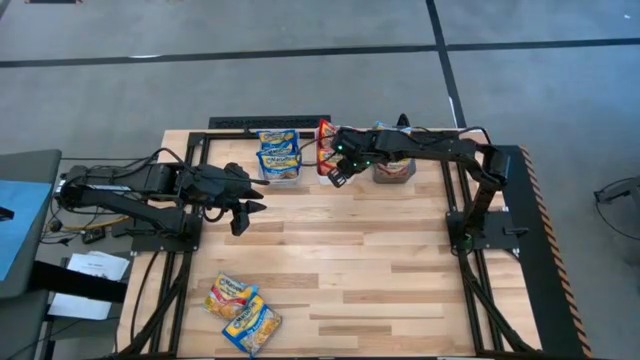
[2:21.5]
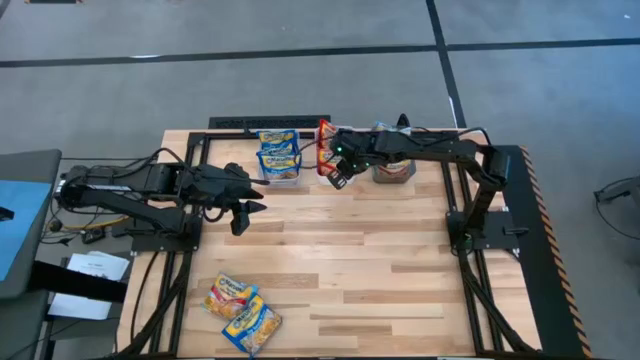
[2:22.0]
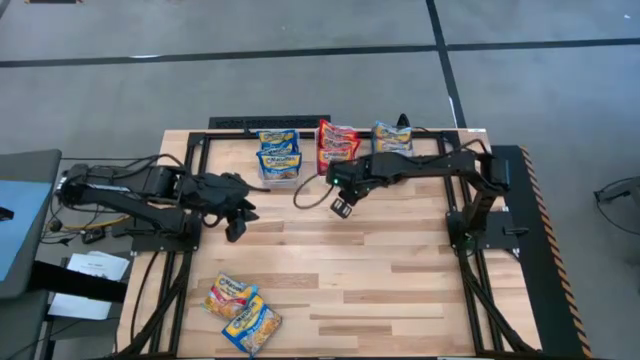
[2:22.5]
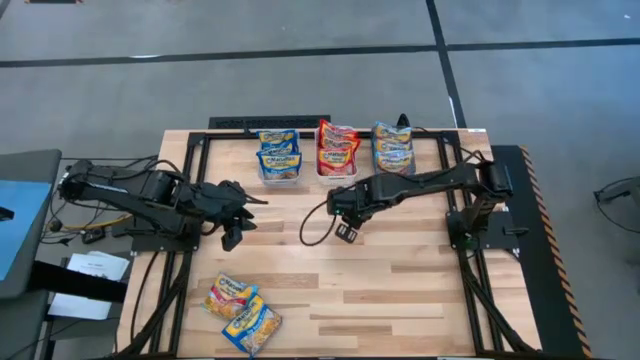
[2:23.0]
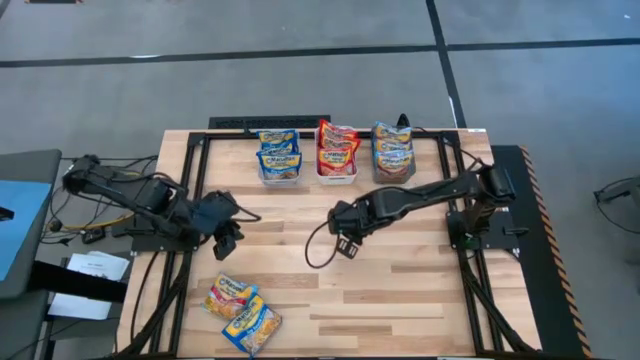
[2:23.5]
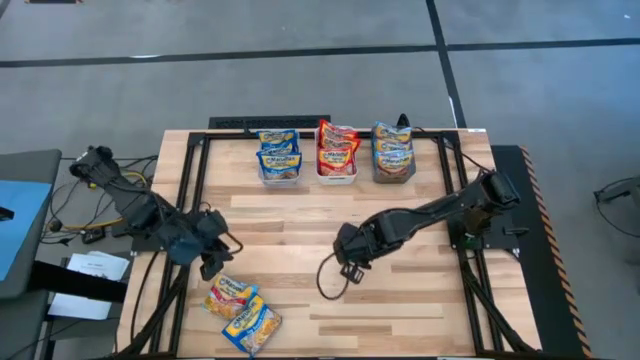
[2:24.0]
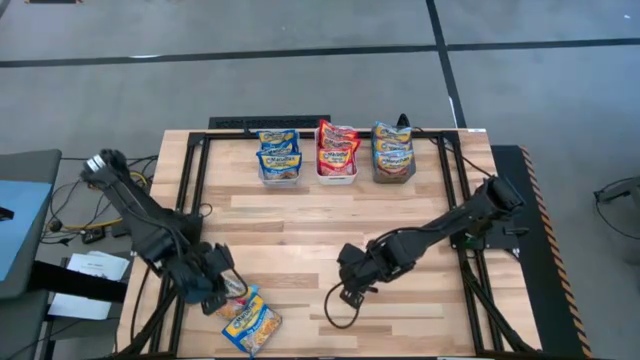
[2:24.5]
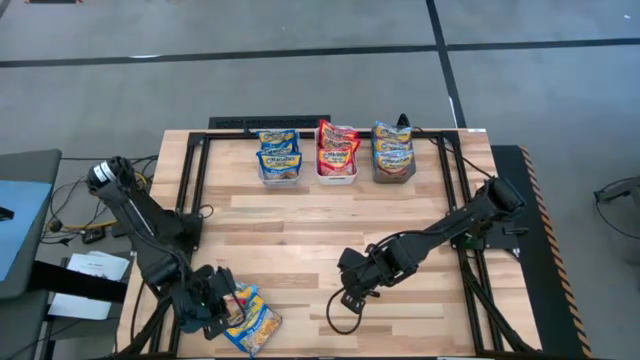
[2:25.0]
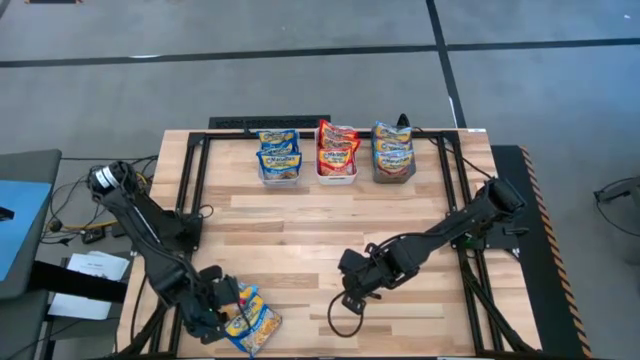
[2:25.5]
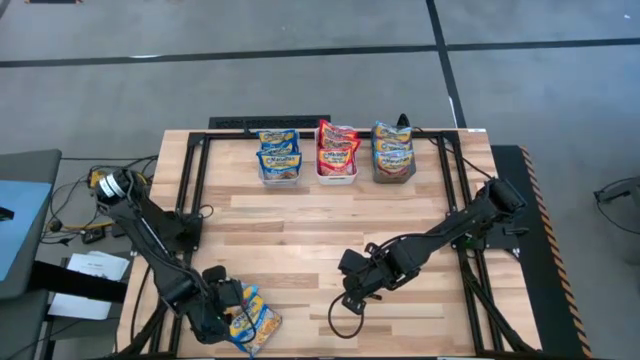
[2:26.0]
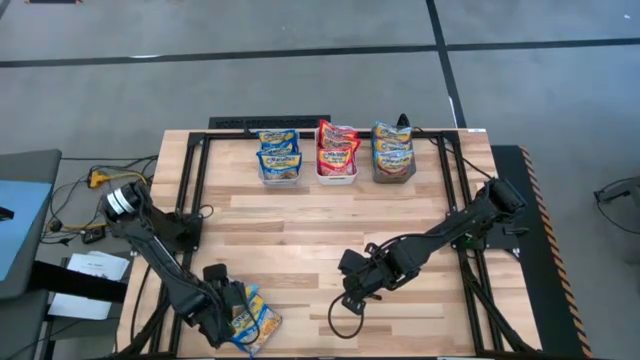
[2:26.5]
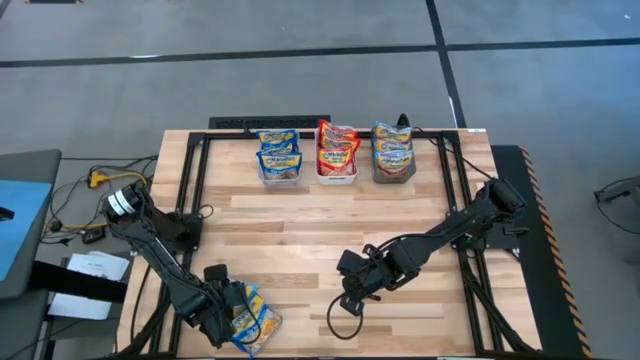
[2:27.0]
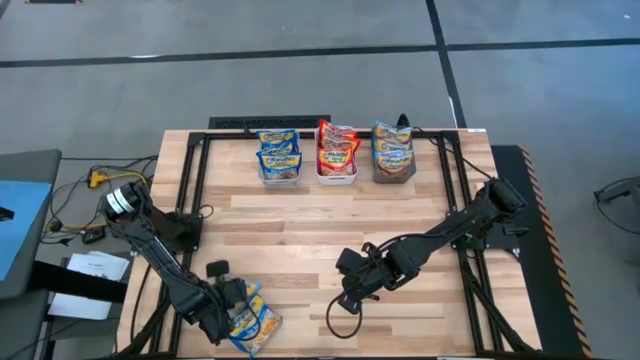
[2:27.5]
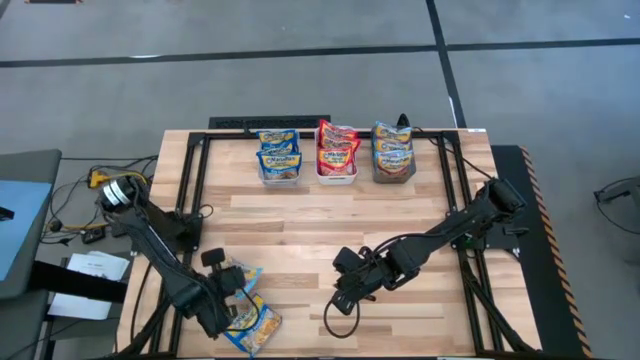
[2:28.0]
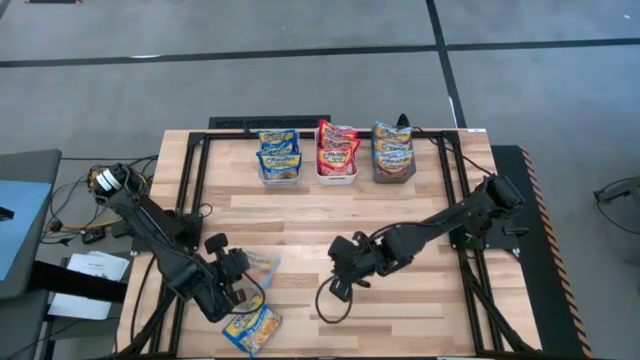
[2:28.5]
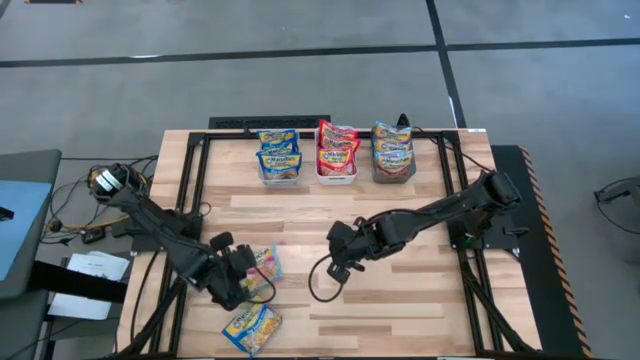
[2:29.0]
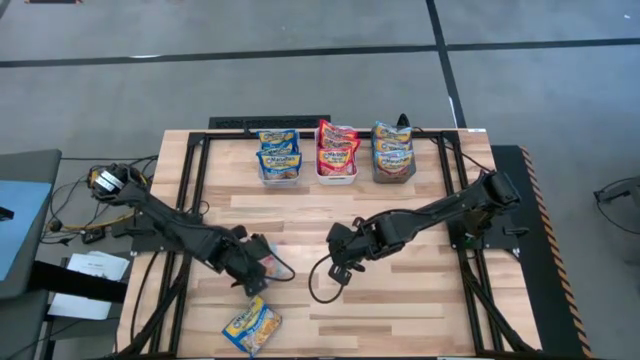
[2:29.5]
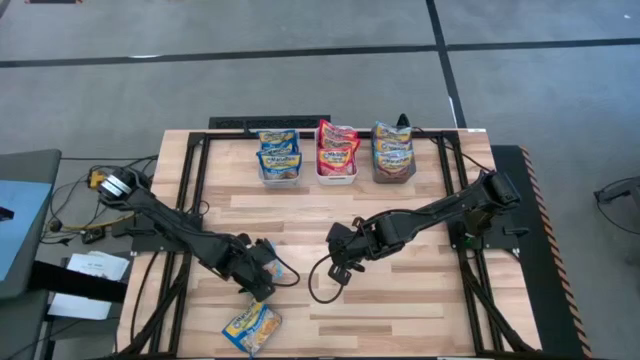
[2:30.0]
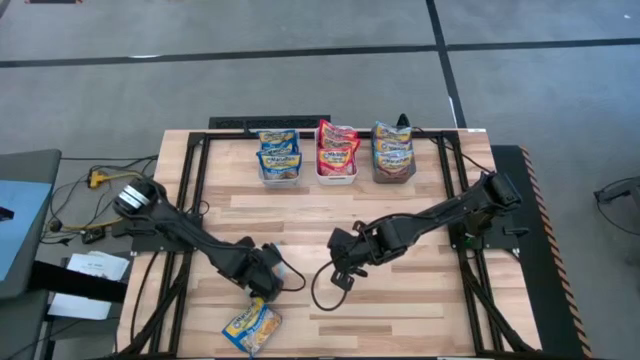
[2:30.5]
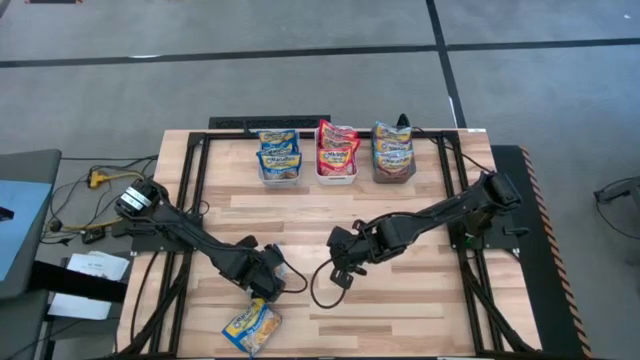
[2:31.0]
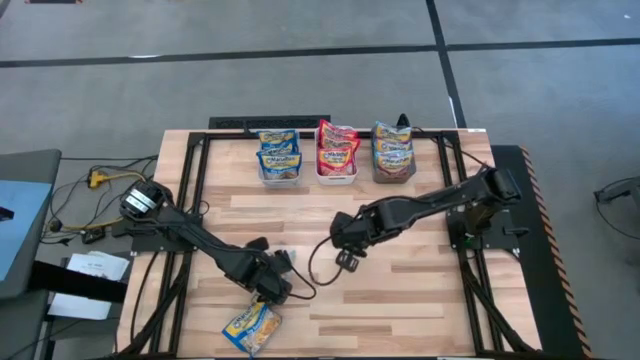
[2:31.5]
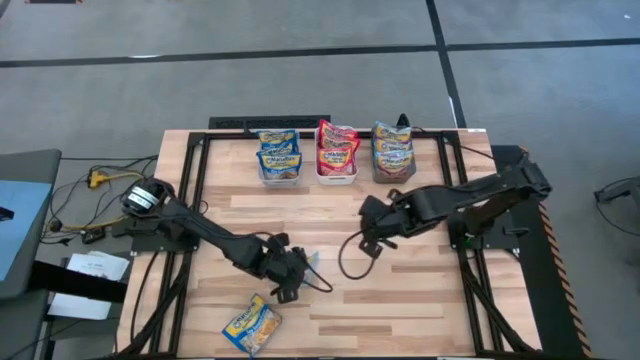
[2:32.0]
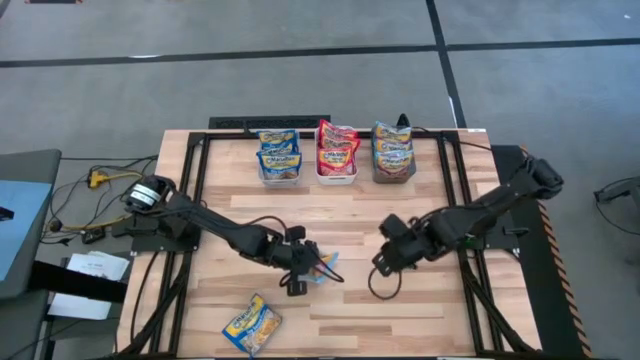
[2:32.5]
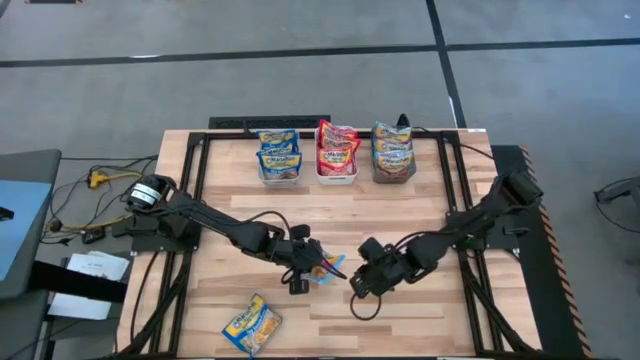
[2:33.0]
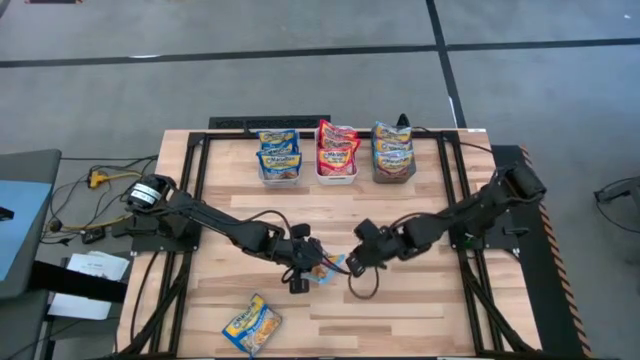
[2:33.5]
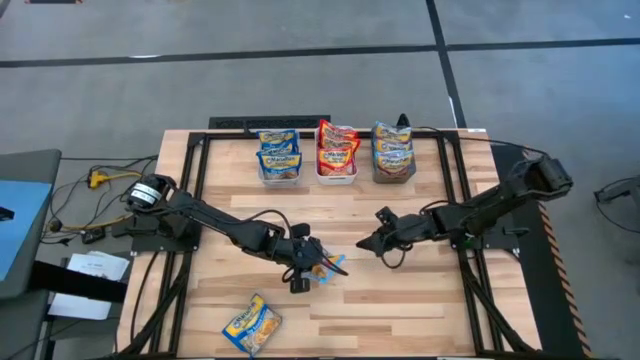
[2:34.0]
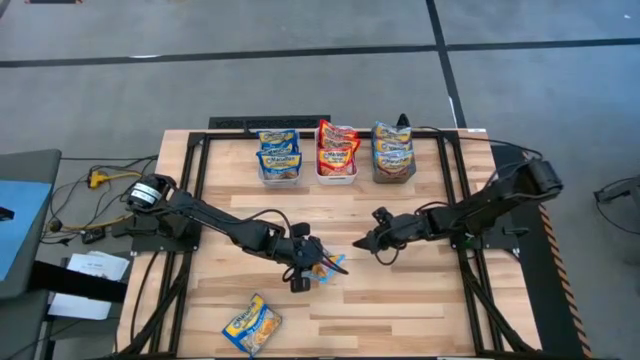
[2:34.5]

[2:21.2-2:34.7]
Task: Sort Maruchan noodles
Put the light blue noodle pack into the black bin

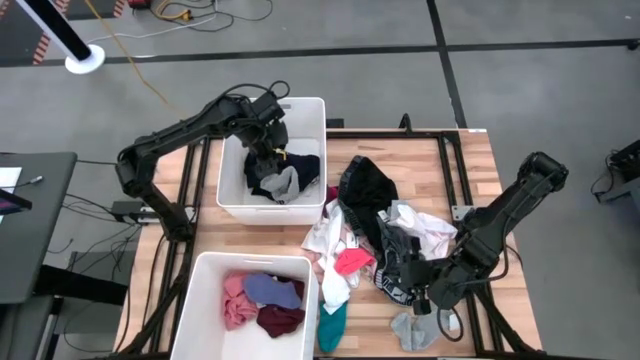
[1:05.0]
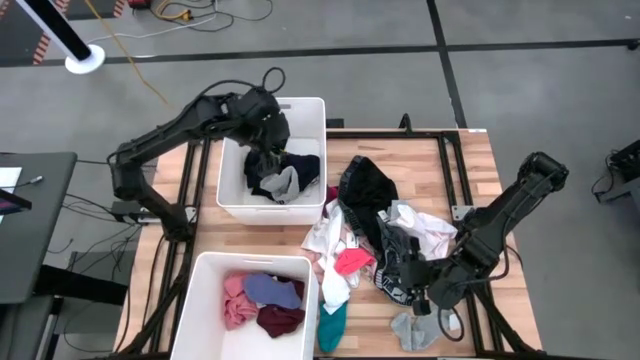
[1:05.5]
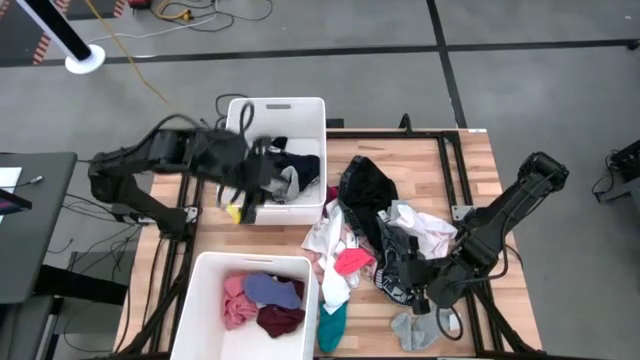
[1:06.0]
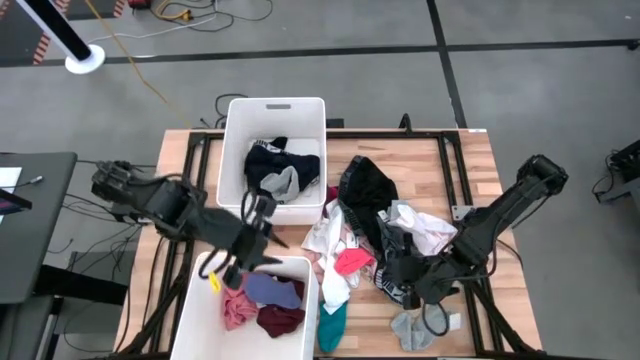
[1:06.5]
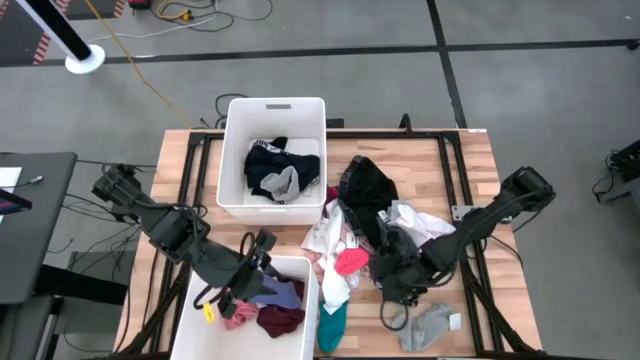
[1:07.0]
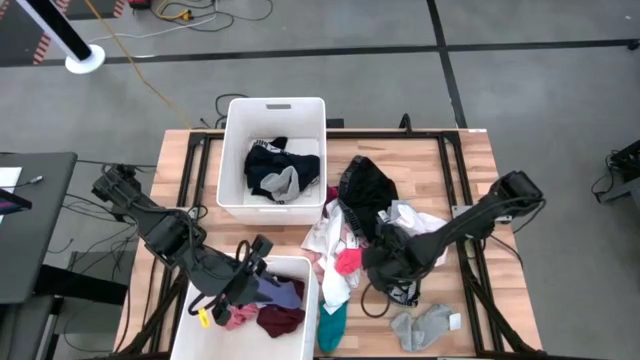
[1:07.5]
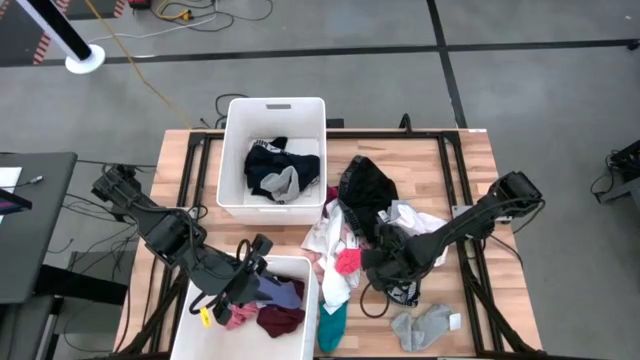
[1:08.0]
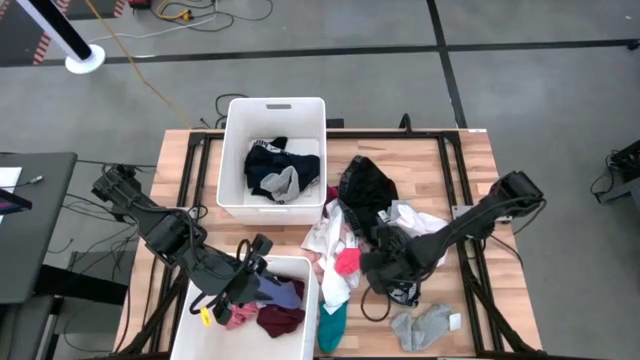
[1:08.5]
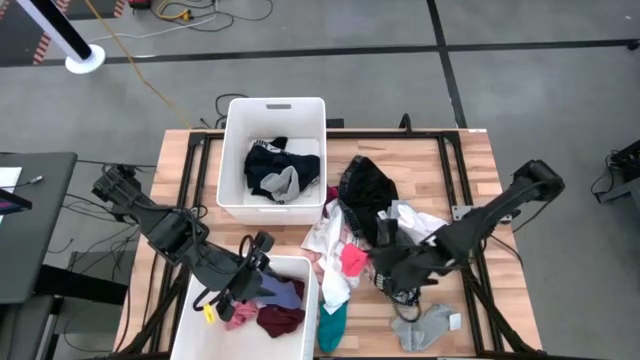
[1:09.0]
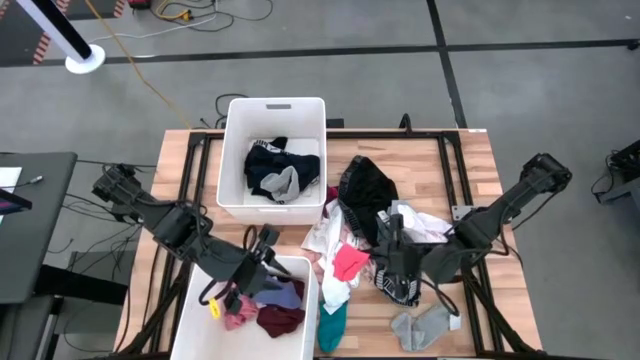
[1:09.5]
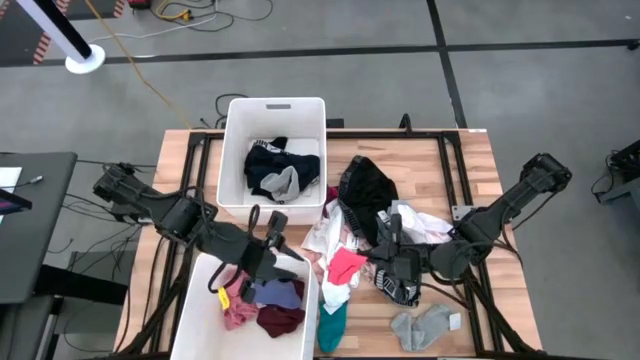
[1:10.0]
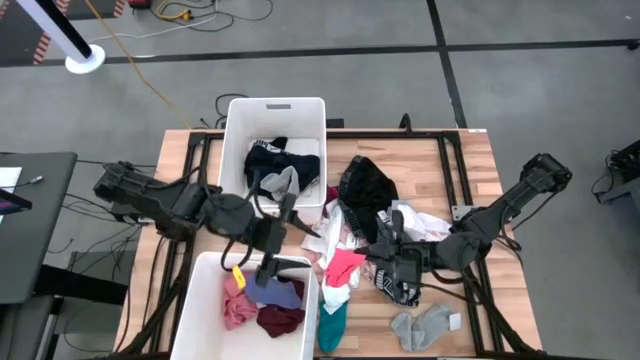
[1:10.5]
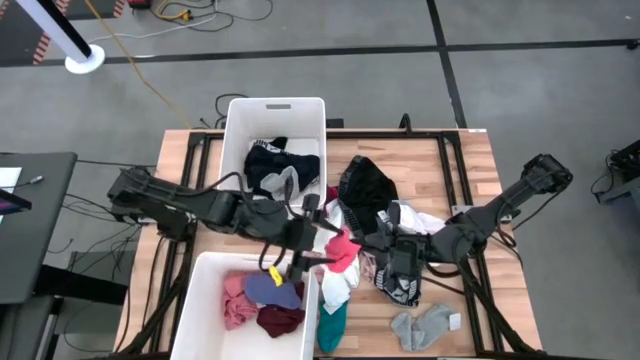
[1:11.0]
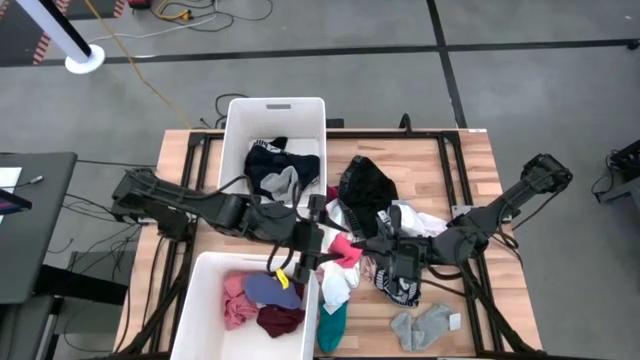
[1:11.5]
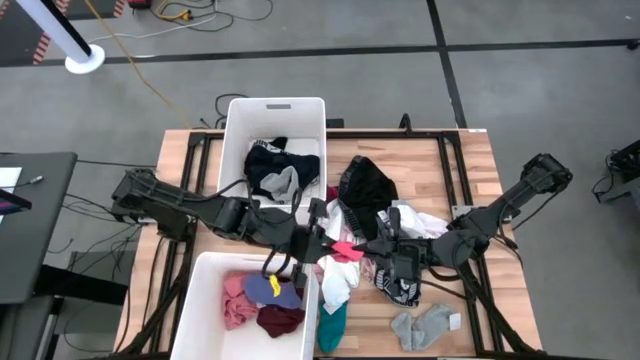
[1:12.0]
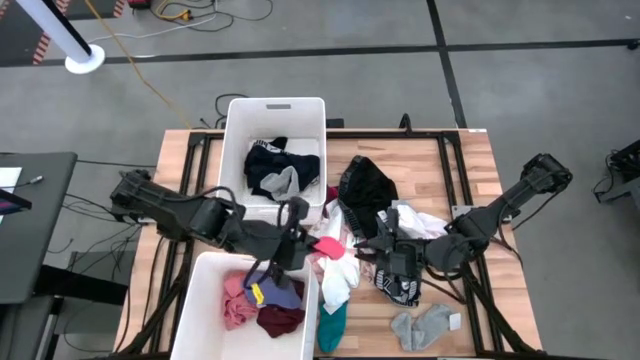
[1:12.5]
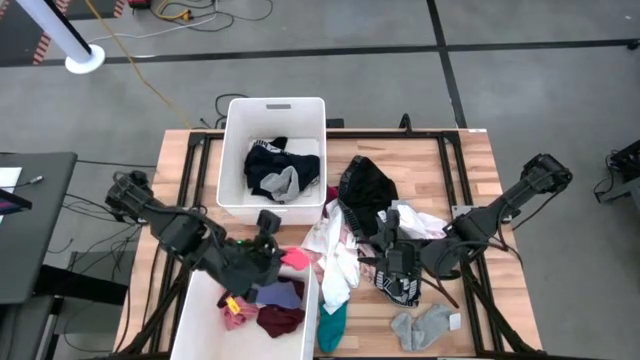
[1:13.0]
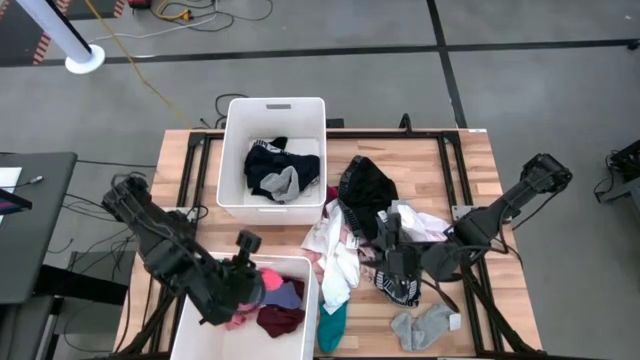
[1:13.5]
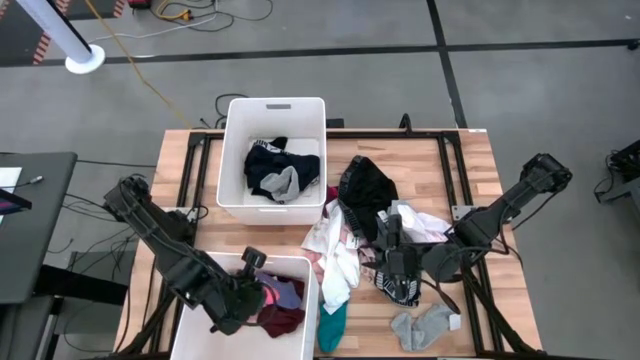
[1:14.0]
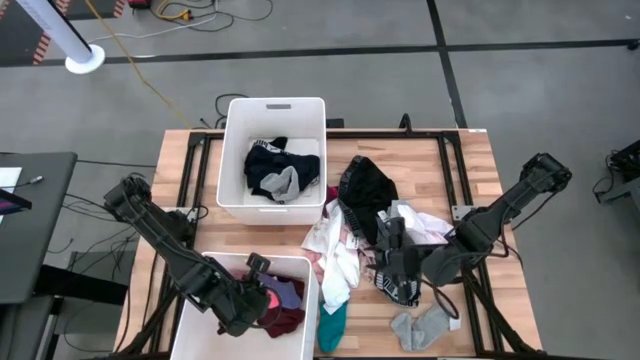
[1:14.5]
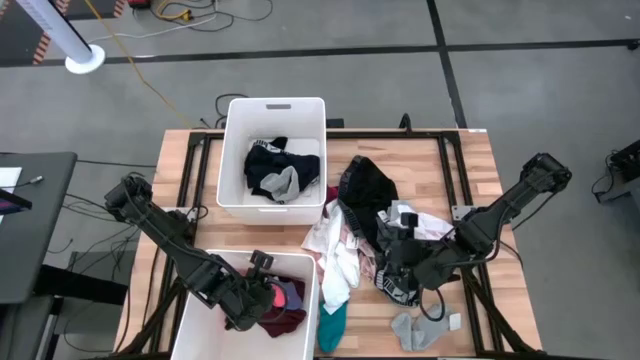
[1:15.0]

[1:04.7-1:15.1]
Task: Sort clothes
Put the pink sock into the bottom white laundry bin
